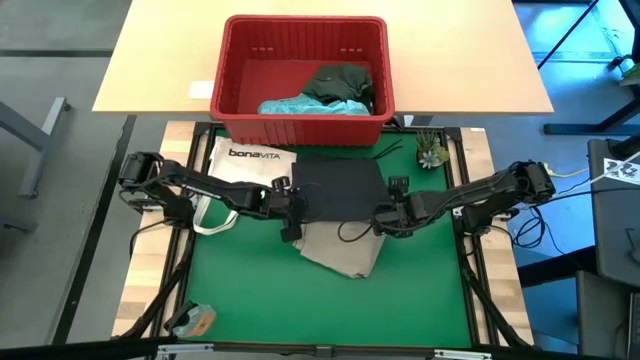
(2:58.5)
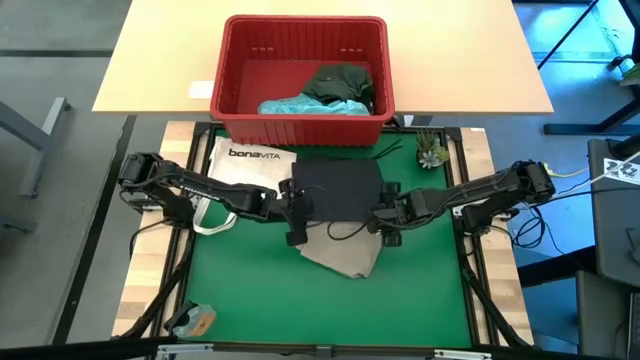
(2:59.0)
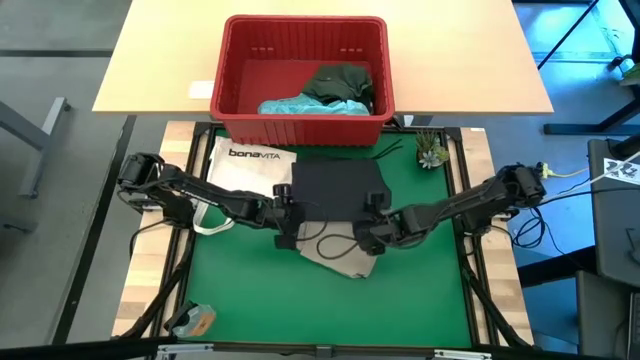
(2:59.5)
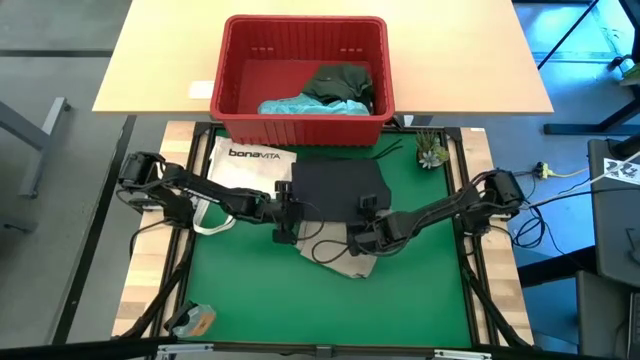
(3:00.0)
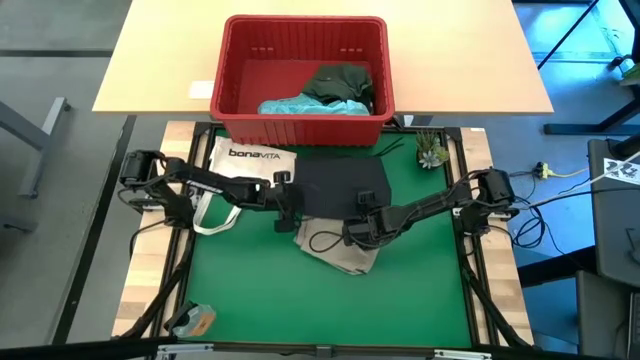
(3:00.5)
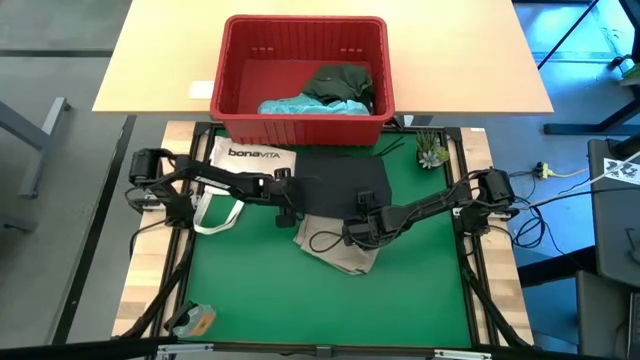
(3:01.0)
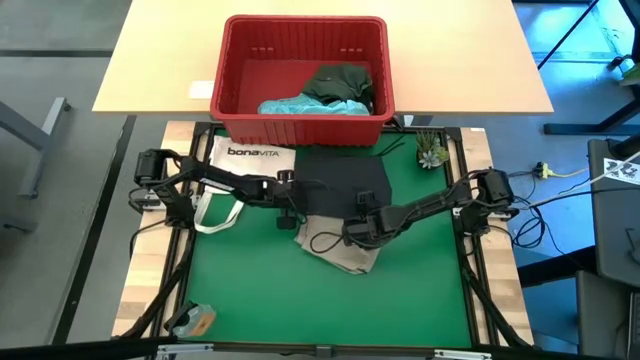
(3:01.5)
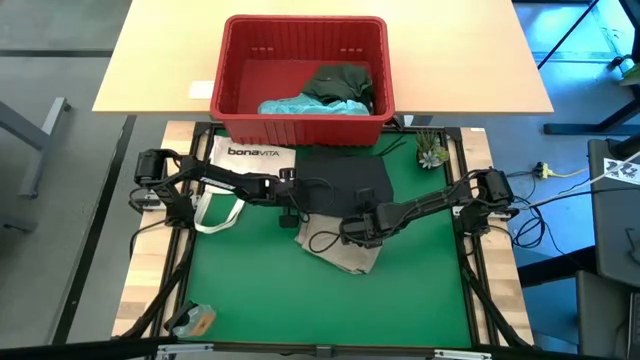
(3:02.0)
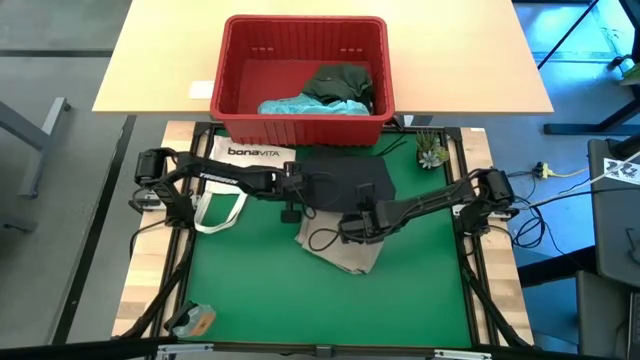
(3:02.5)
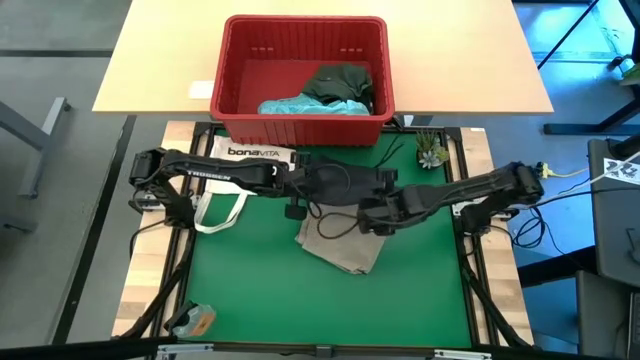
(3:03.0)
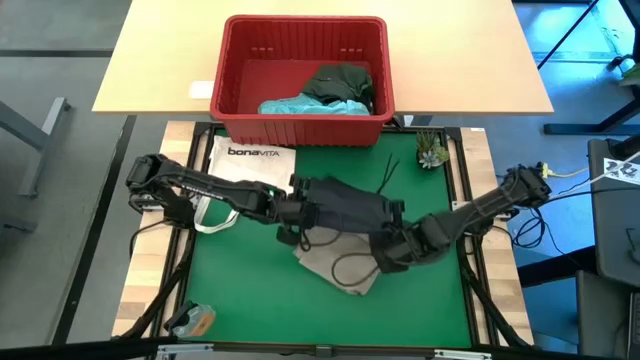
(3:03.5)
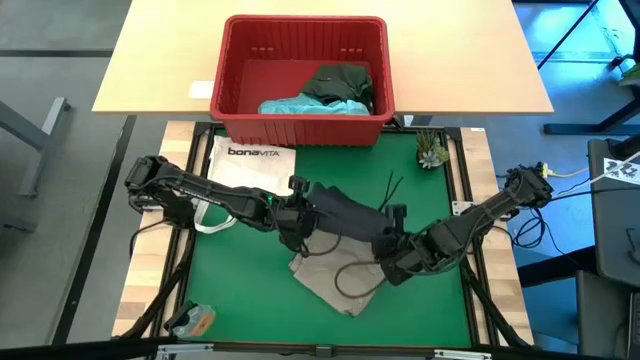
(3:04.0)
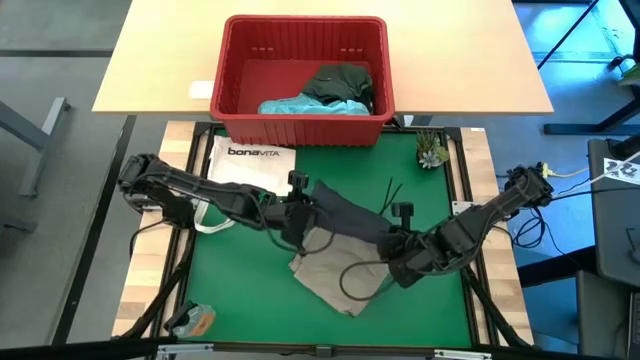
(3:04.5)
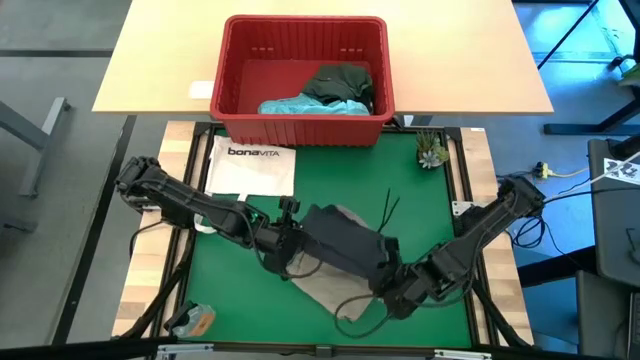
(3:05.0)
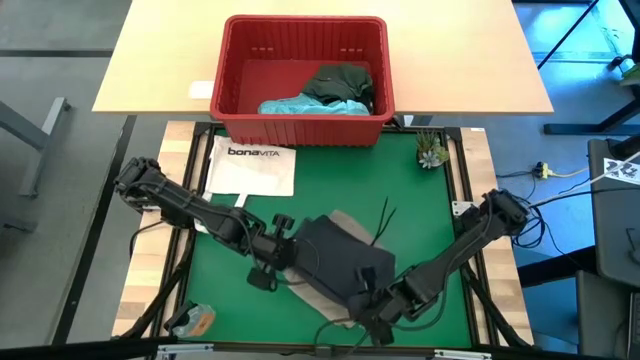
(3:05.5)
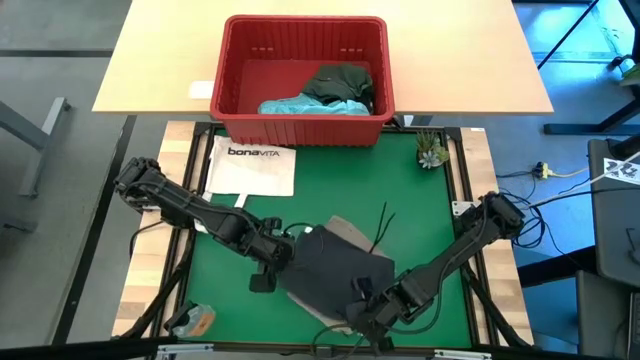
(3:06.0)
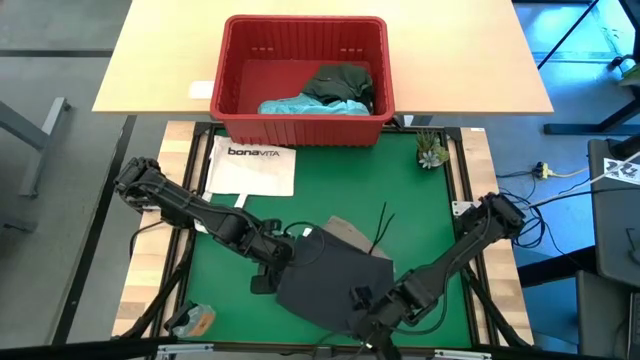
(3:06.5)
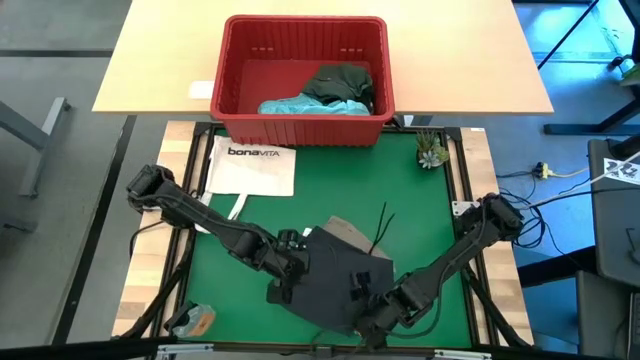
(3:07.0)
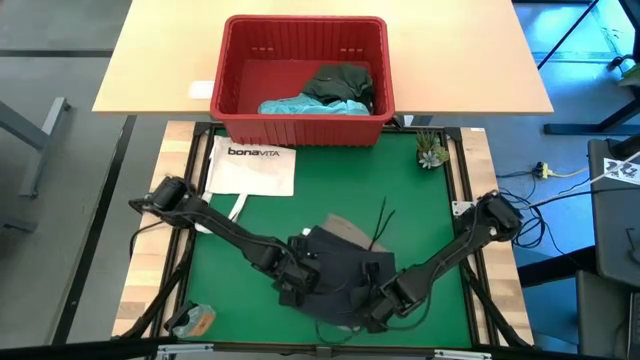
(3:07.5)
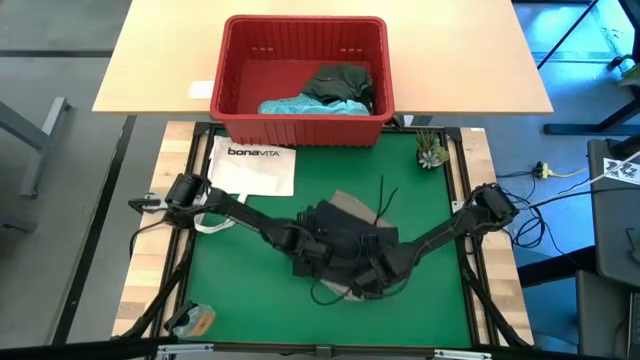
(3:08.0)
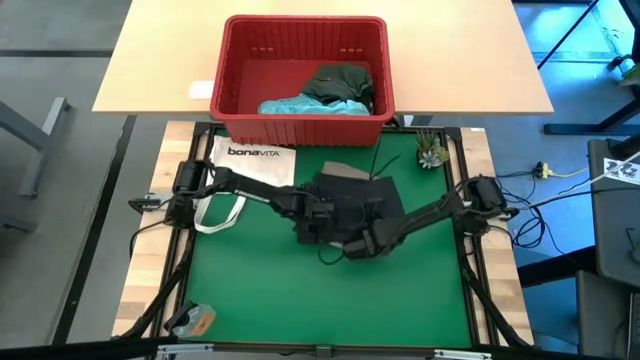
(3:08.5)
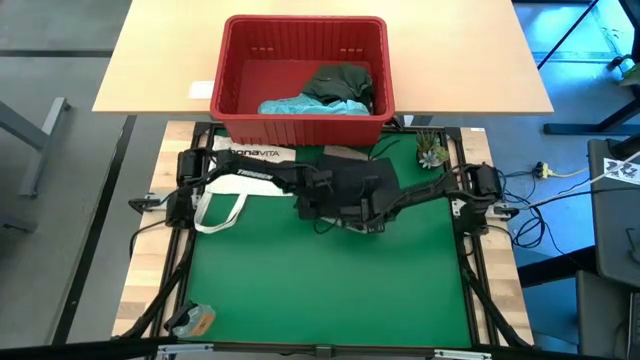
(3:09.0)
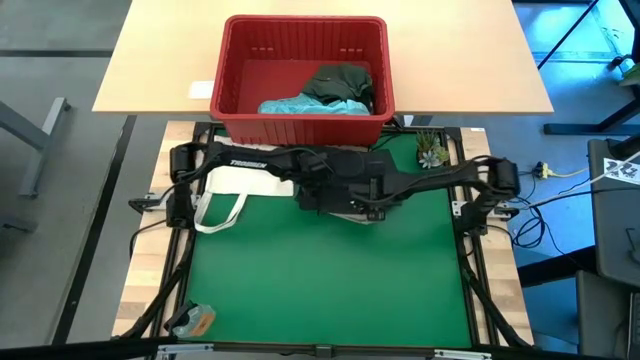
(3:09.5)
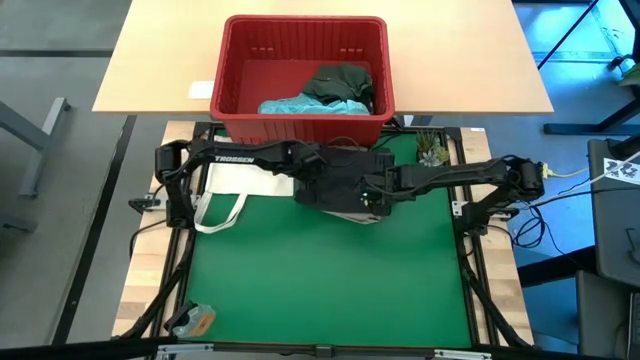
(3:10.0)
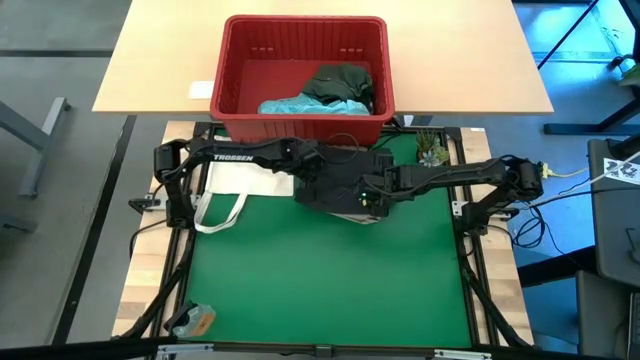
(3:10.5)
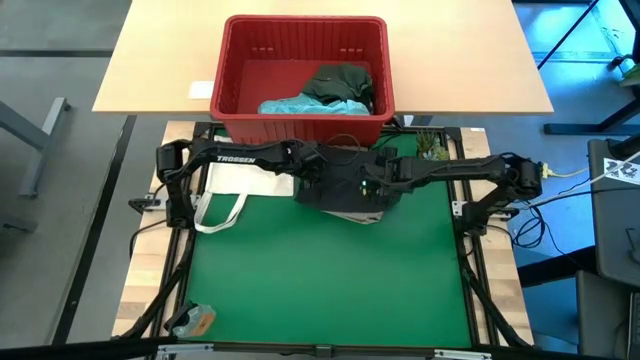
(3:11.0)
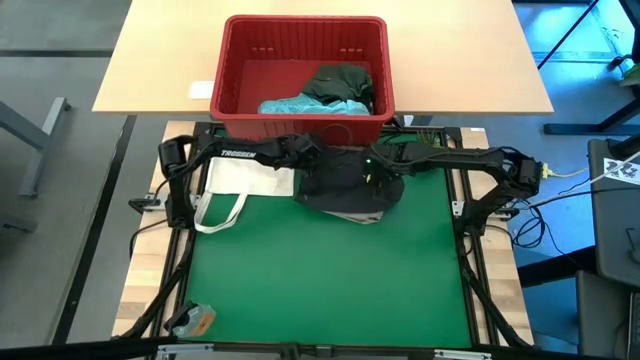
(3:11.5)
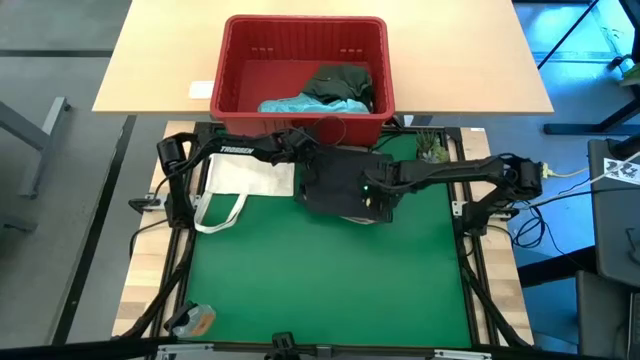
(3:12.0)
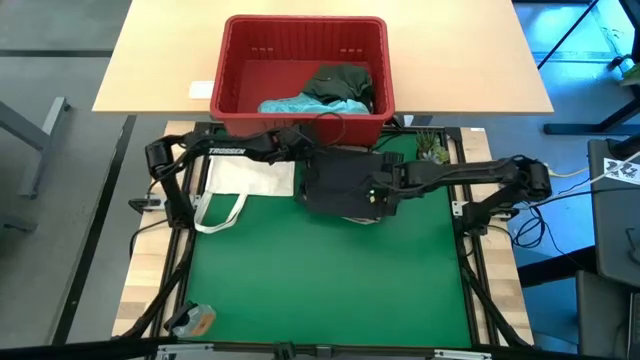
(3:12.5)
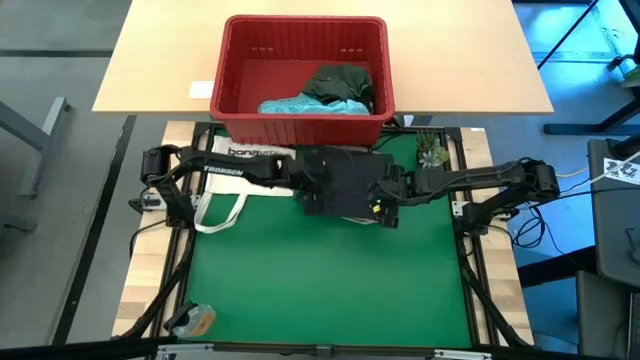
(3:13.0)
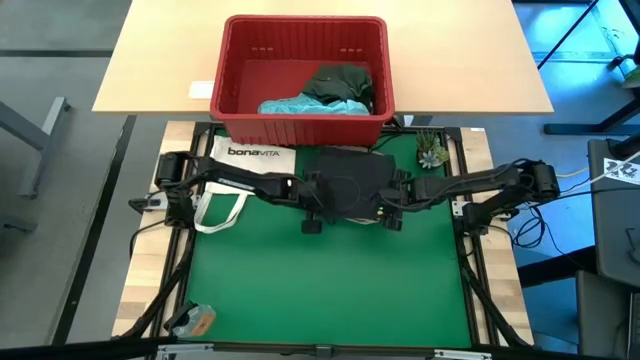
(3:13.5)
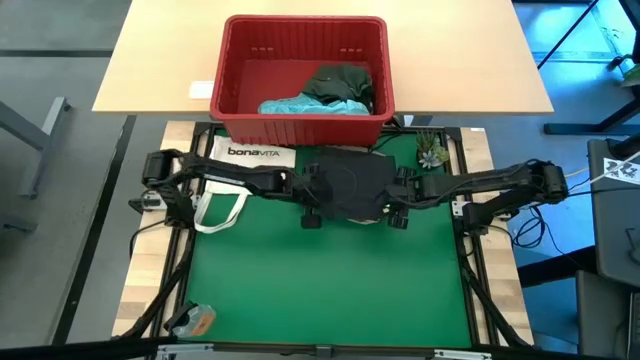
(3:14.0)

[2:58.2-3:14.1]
Task: Fold Laundry from Bin
Stack the folded black shorts on top of the folded light brown shorts

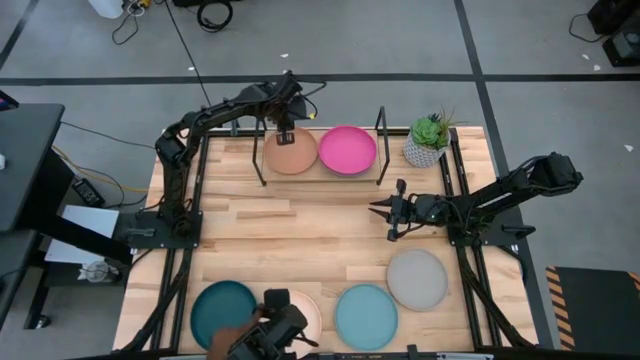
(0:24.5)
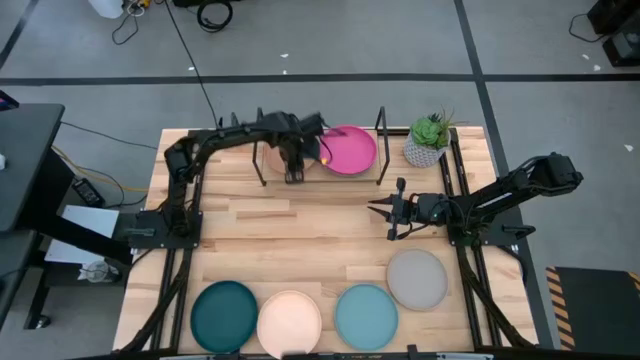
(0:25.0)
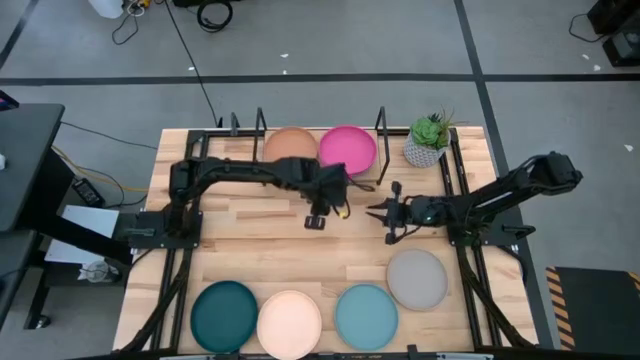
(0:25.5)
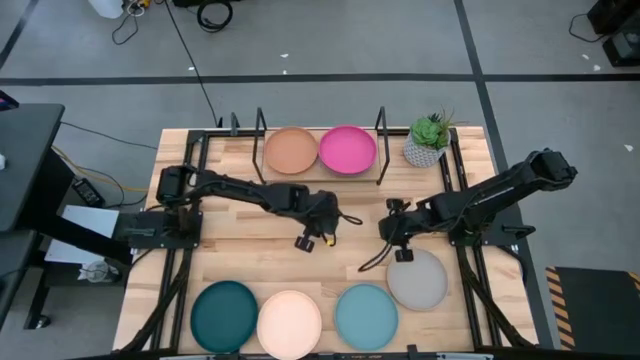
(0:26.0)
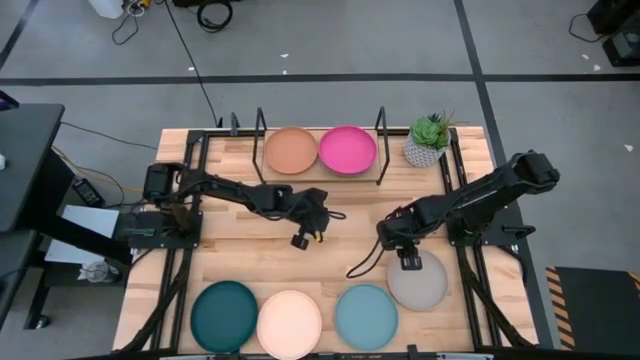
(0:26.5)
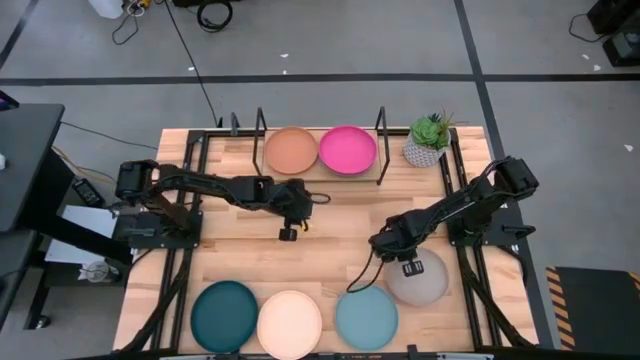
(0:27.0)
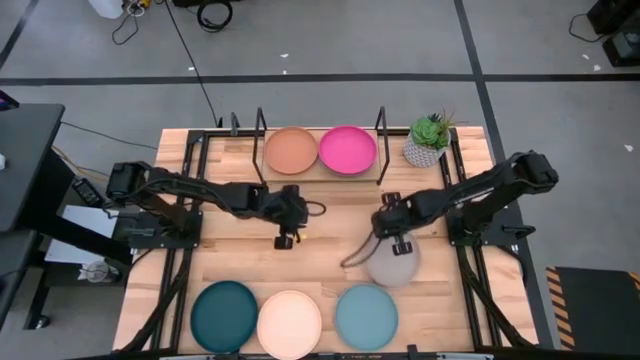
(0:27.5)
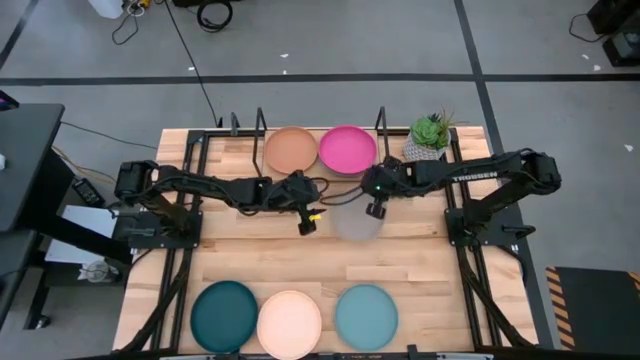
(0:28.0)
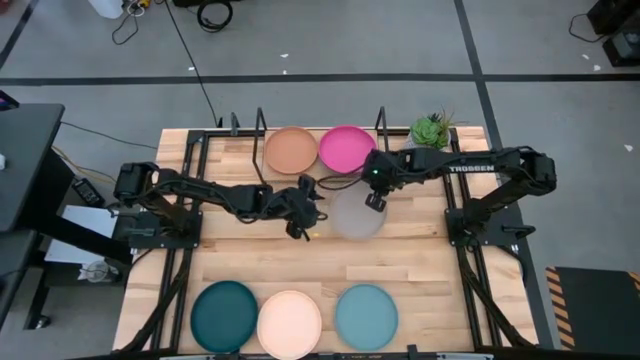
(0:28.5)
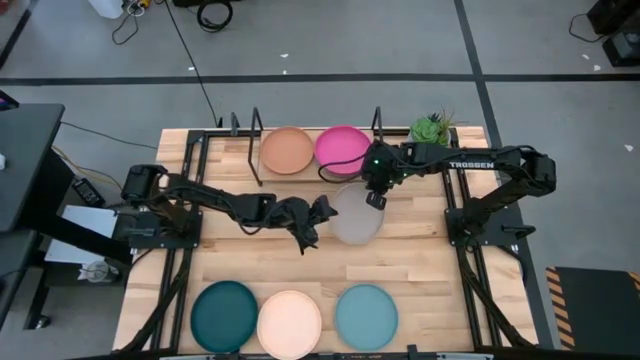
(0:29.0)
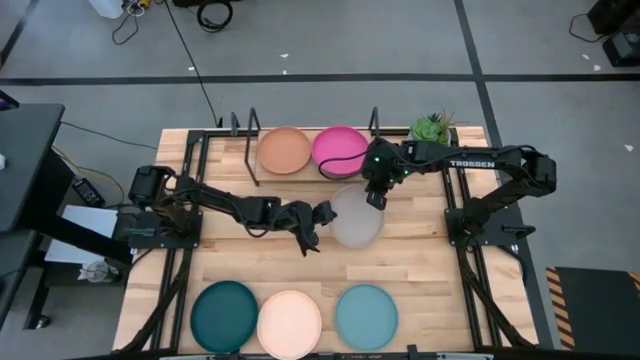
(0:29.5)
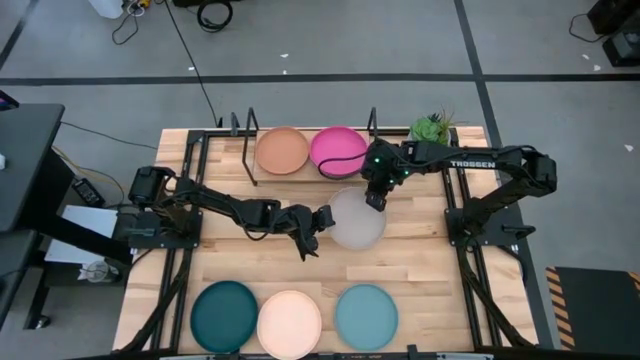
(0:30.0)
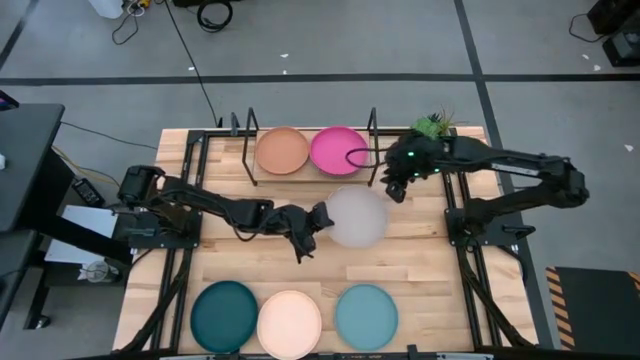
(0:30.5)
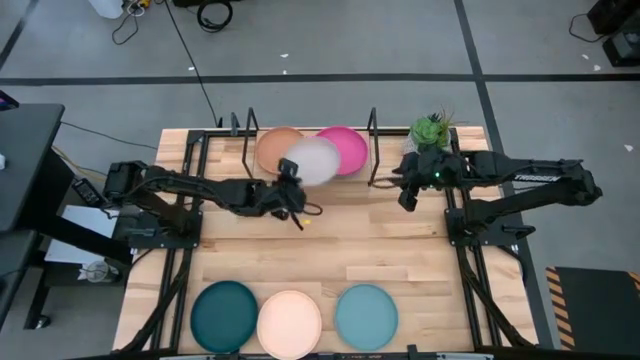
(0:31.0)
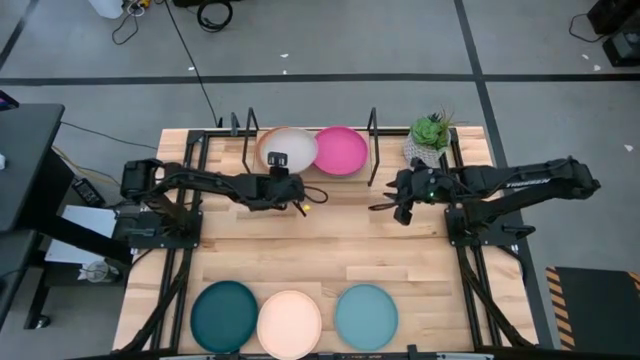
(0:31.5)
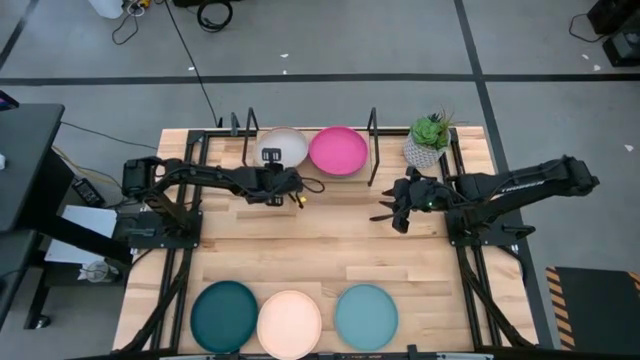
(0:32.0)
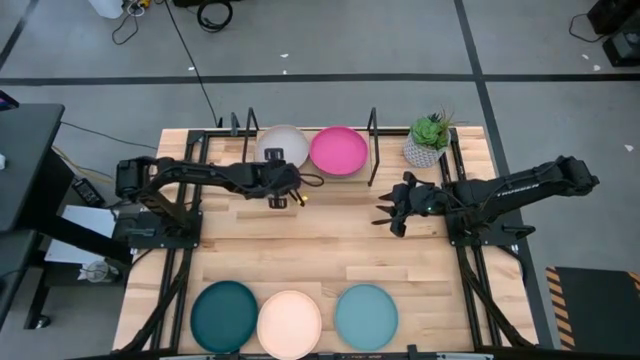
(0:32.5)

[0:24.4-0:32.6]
Task: Place and stack plates onto a shelf
Stack the gray plate on top of the light brown plate on the shelf
